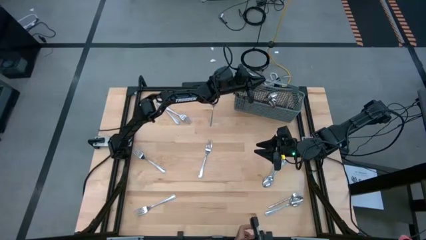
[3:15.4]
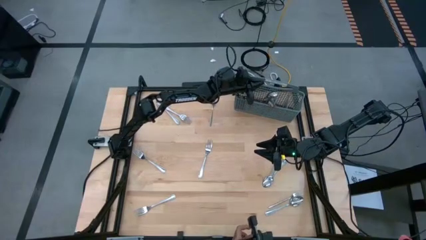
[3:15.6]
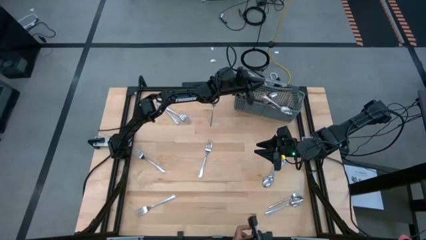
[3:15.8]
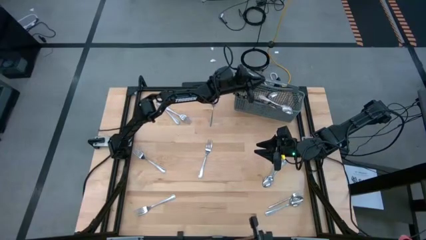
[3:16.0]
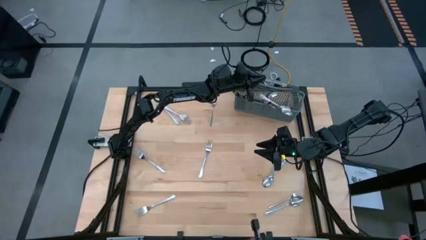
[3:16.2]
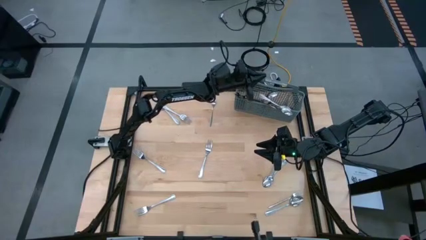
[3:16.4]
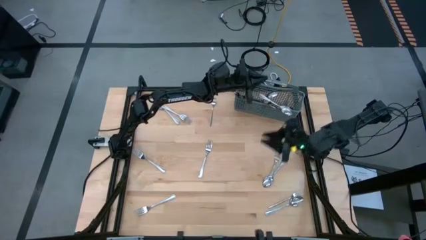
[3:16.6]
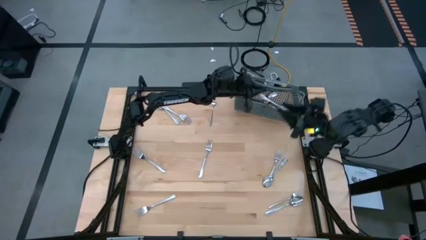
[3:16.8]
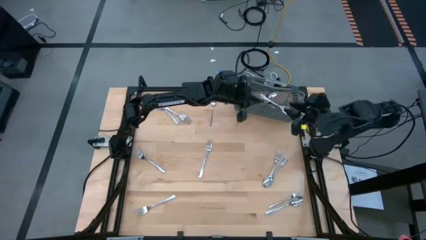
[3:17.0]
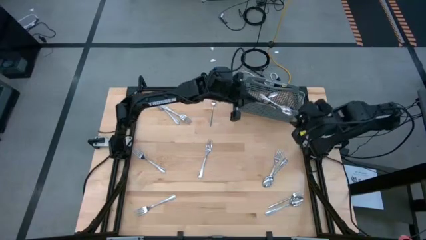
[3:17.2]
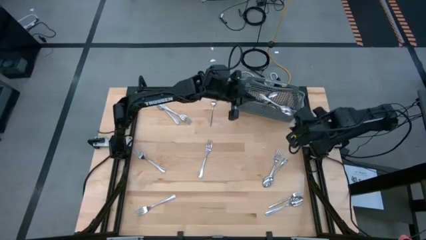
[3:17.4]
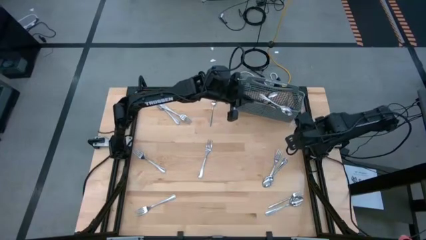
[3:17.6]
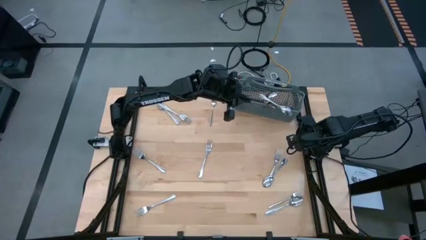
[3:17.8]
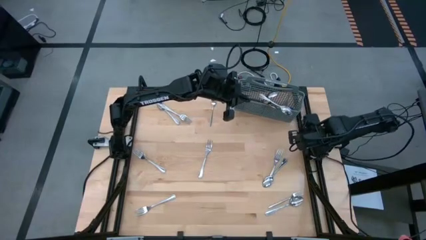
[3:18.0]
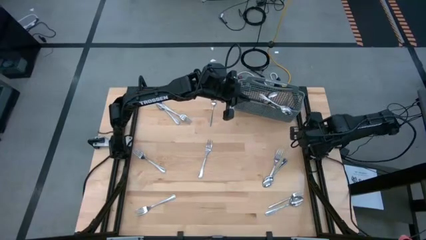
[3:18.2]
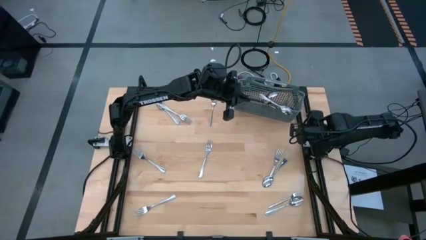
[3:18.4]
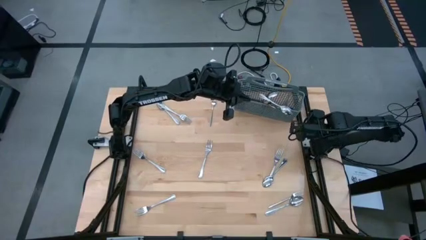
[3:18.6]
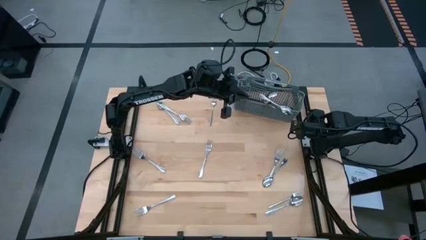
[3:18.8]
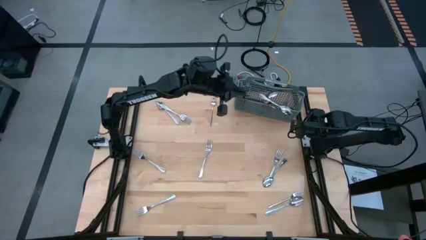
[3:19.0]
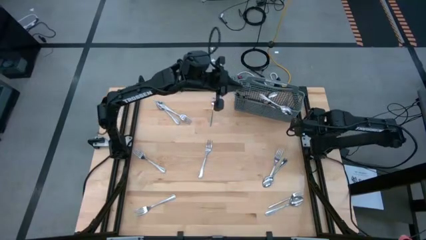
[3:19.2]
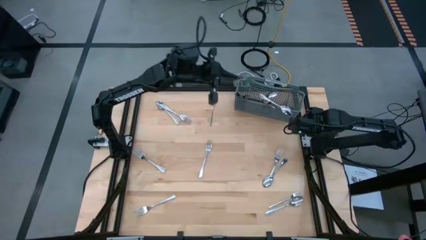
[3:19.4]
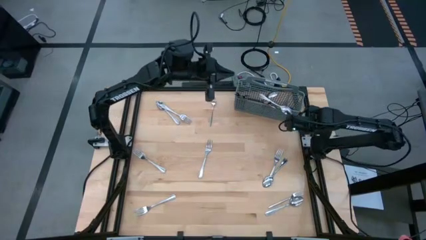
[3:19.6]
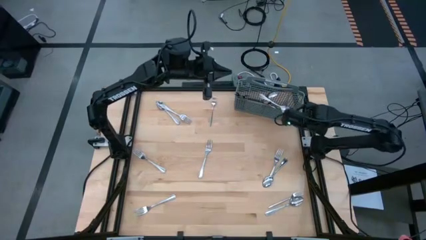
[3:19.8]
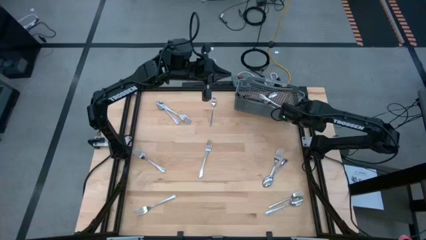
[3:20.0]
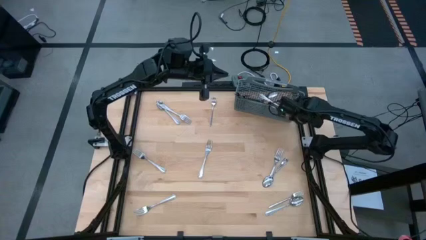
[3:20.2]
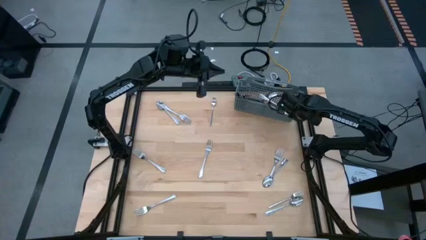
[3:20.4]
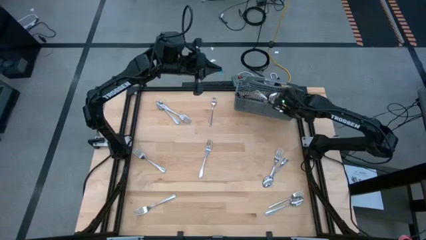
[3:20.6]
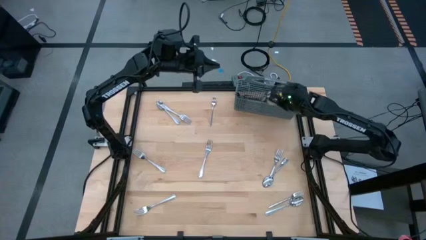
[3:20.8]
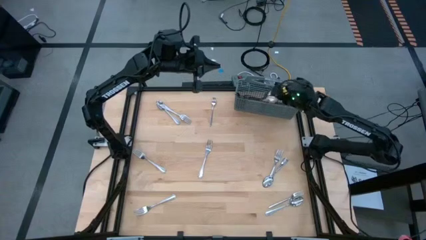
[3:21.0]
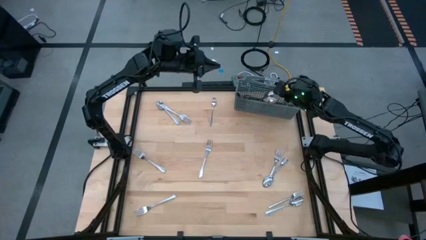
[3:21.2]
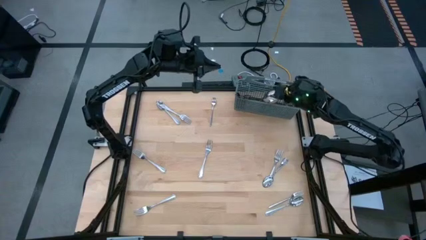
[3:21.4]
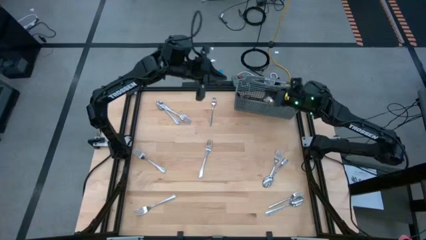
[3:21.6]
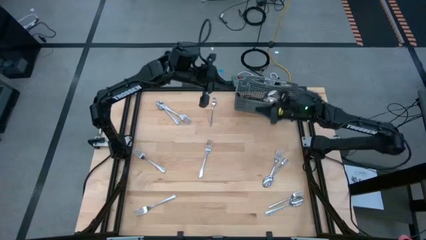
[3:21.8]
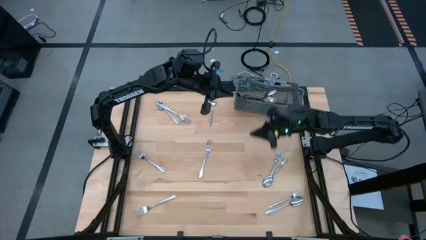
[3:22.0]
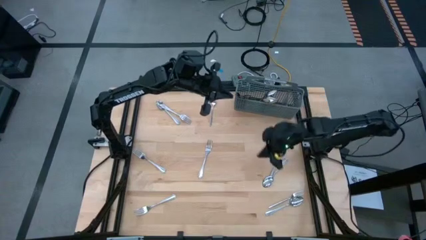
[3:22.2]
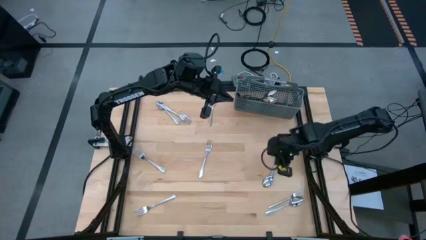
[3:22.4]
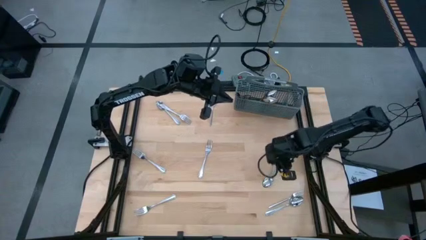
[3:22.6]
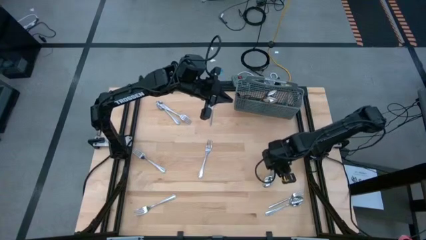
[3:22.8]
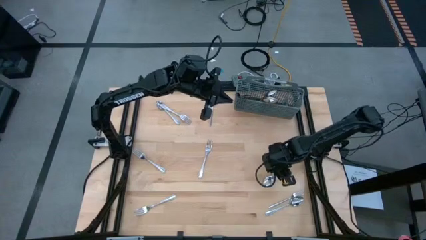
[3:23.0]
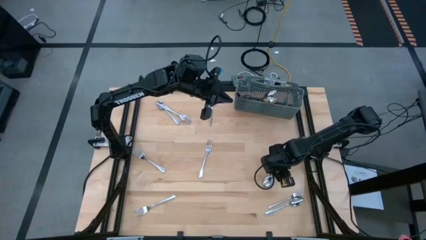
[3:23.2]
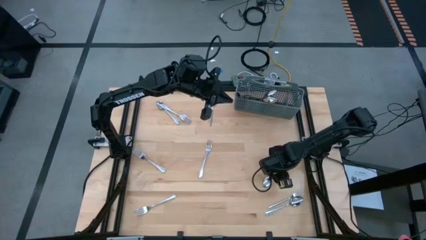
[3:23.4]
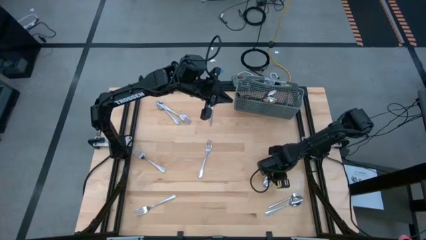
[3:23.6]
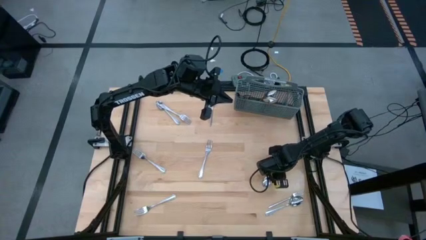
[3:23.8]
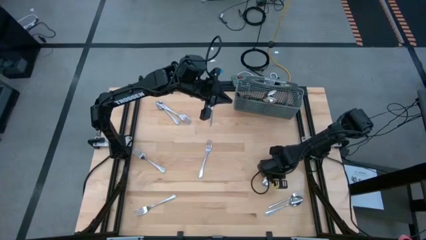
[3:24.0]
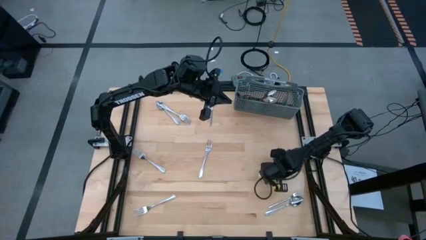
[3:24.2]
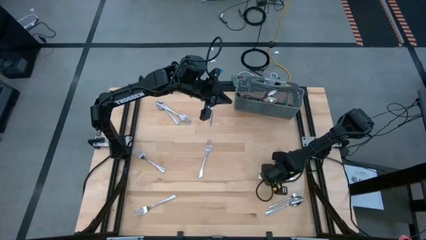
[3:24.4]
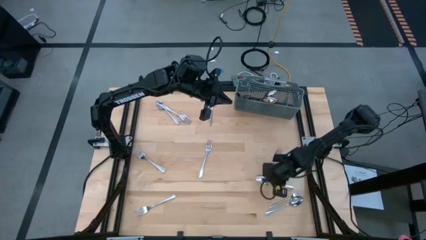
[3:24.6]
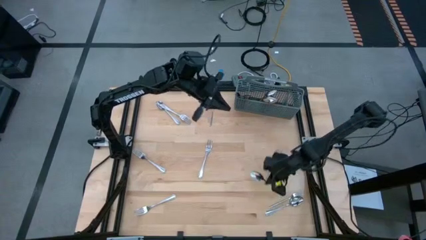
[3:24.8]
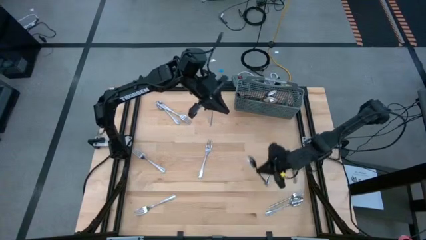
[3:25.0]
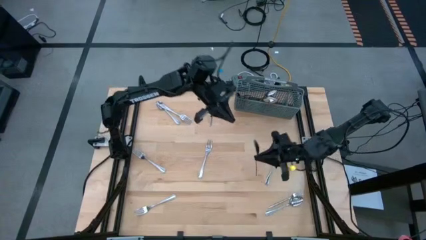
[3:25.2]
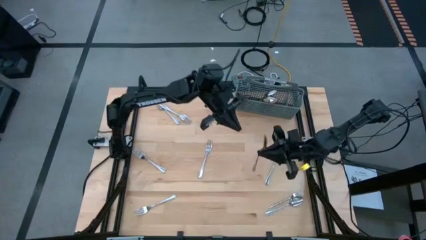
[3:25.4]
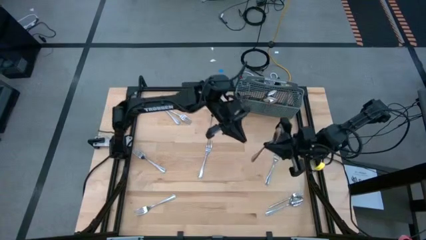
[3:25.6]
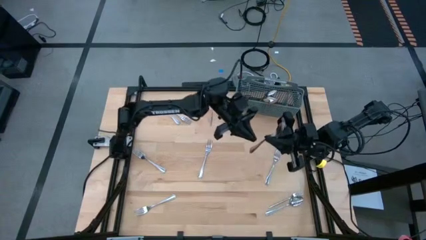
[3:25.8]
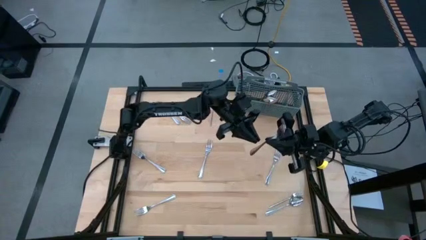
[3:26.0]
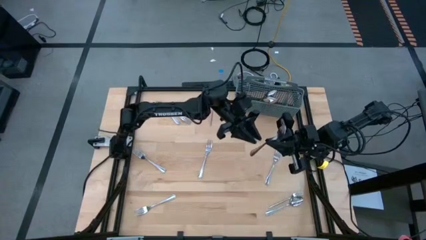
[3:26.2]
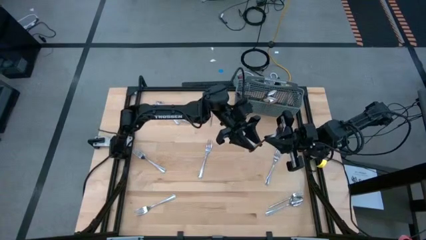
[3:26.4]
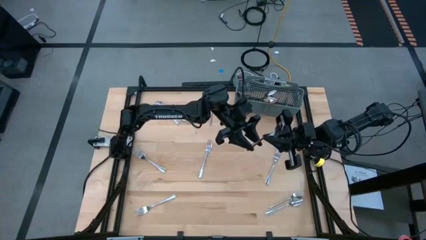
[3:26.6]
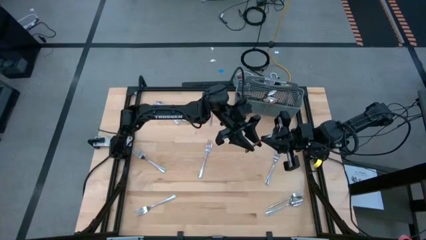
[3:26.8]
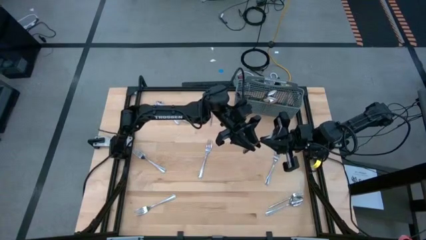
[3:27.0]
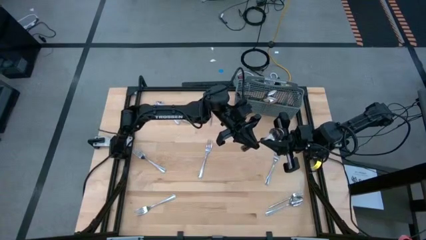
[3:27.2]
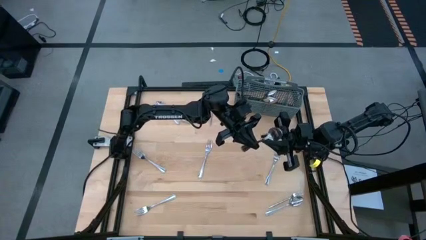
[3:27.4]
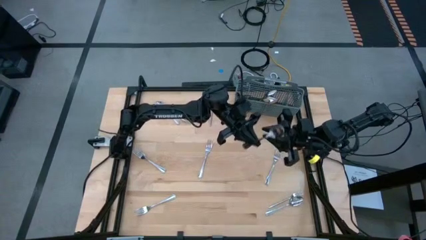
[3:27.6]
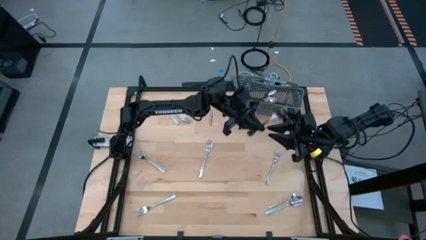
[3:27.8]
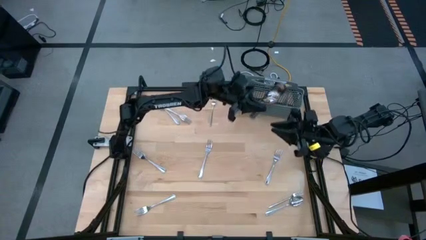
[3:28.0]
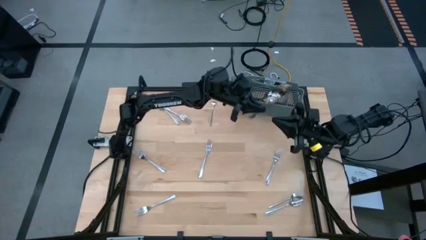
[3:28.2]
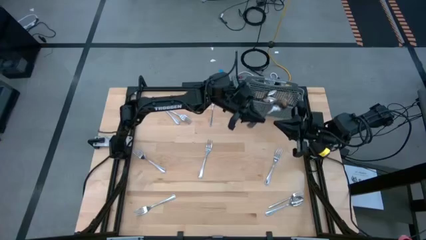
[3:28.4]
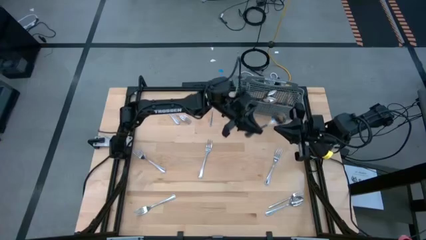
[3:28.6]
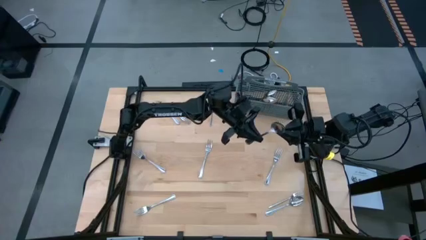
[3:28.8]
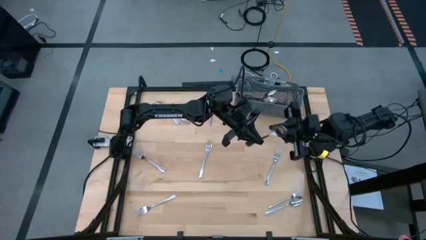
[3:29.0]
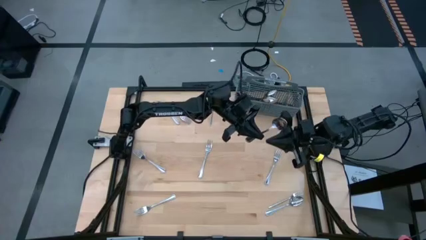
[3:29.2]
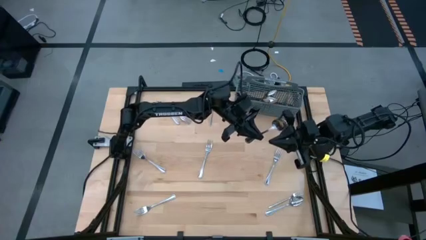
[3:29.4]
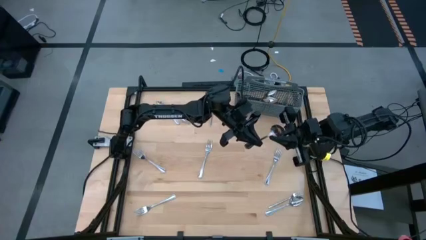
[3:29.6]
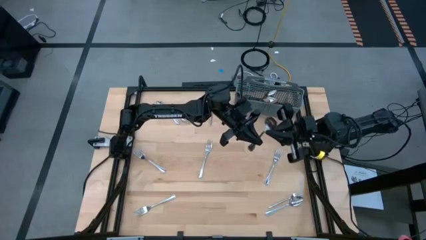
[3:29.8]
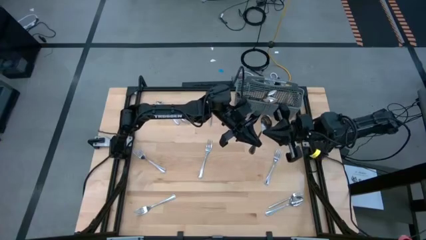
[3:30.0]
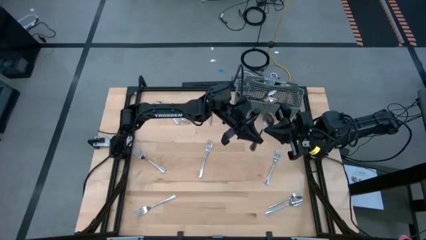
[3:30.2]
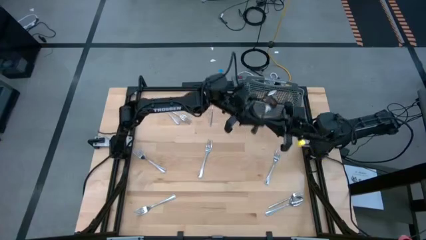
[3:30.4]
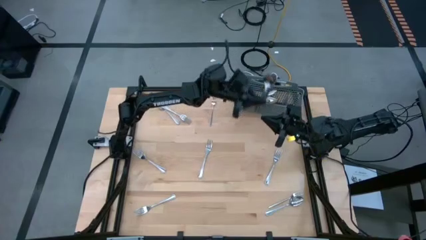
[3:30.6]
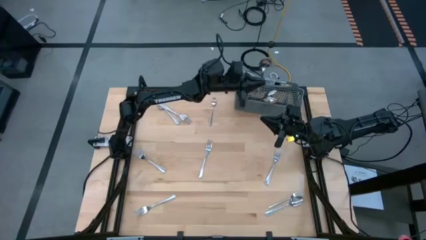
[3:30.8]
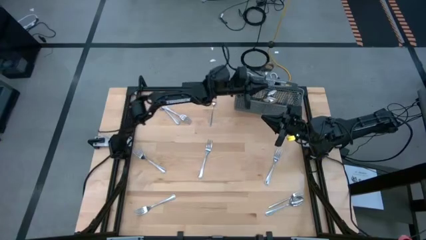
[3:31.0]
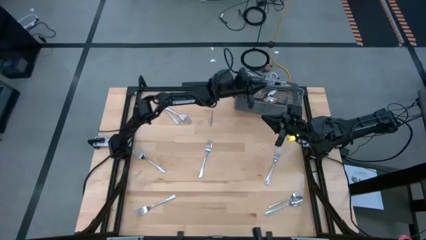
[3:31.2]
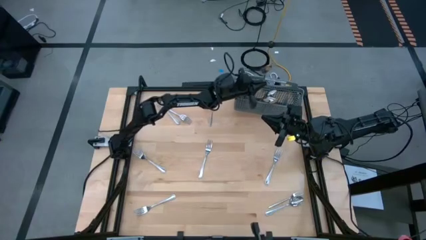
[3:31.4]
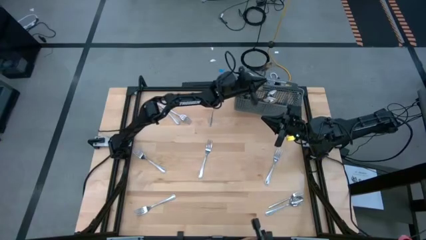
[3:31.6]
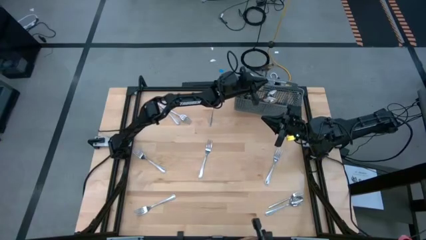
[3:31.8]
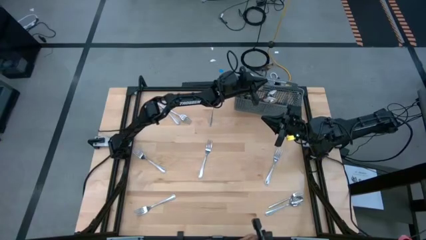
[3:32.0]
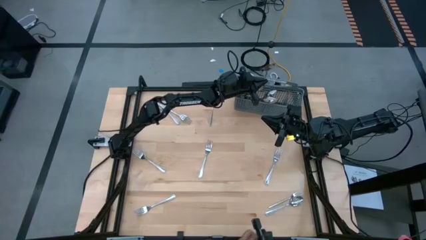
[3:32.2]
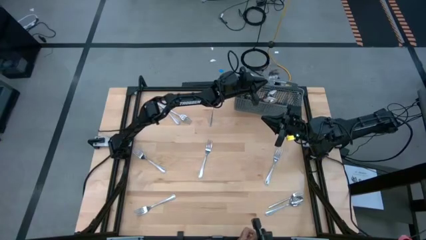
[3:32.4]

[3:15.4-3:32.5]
Task: Sort silverware
Put the silver spoon into the silverware basket
